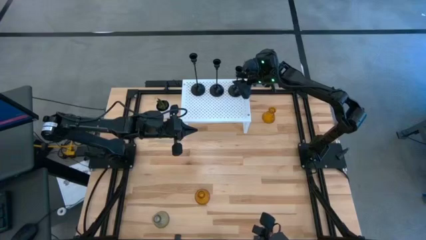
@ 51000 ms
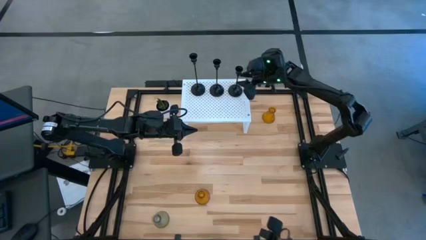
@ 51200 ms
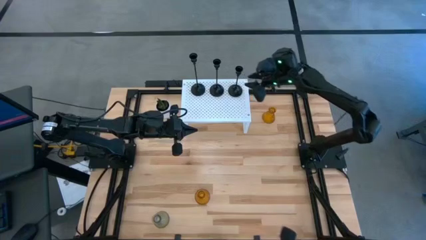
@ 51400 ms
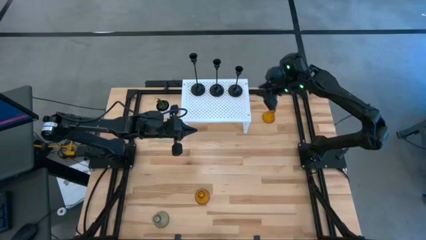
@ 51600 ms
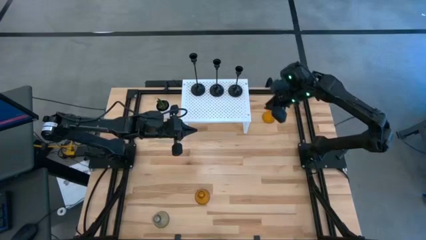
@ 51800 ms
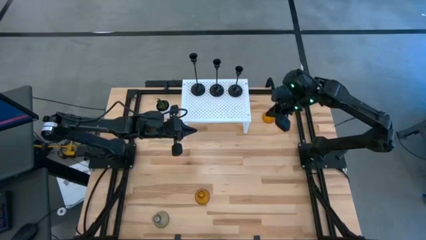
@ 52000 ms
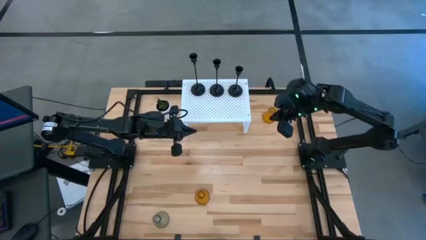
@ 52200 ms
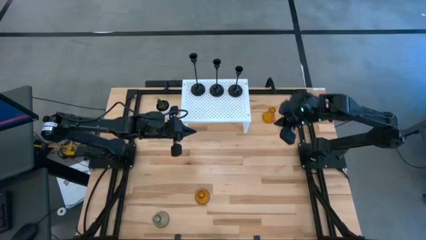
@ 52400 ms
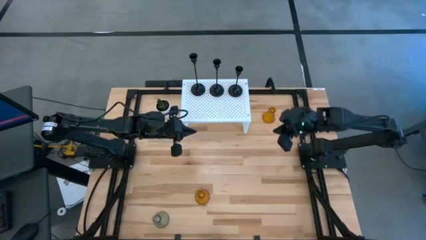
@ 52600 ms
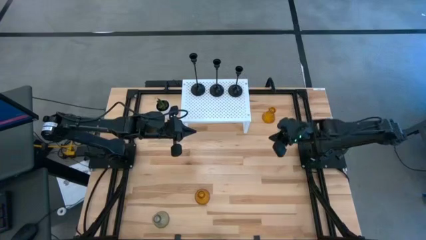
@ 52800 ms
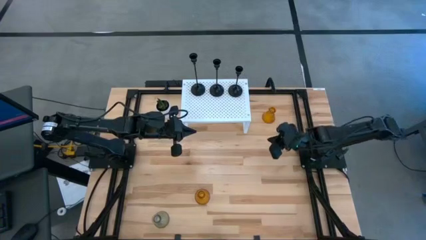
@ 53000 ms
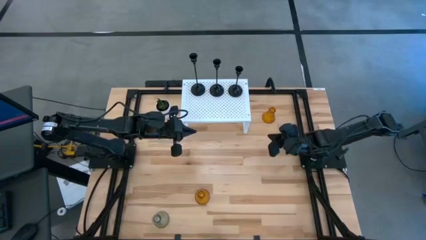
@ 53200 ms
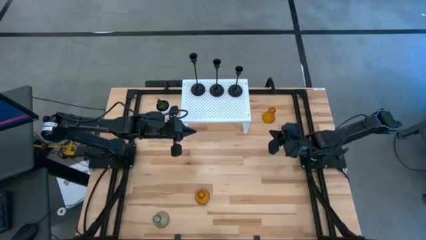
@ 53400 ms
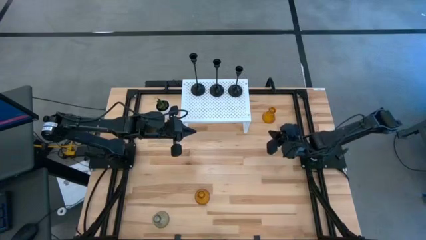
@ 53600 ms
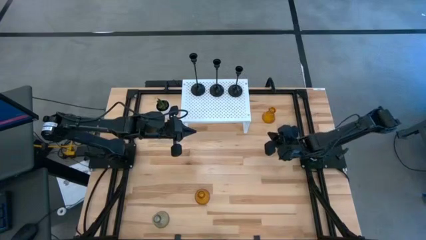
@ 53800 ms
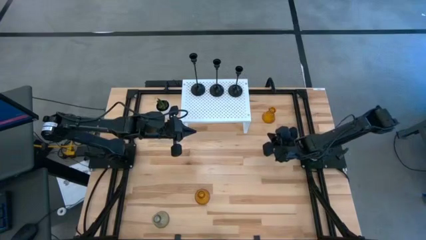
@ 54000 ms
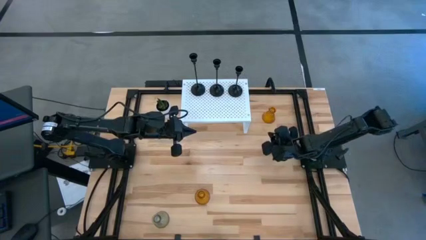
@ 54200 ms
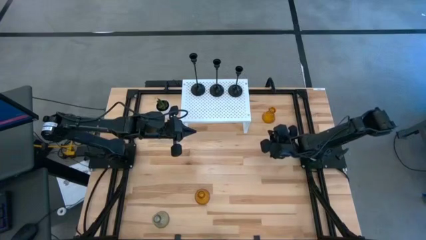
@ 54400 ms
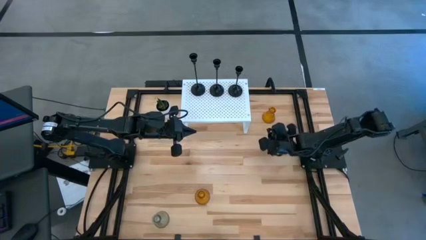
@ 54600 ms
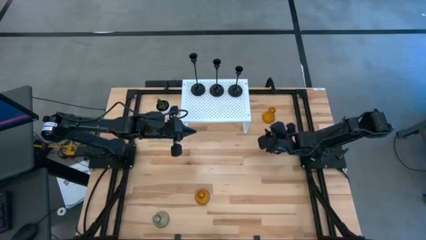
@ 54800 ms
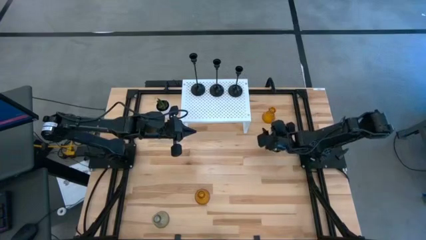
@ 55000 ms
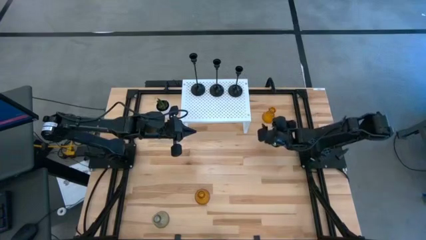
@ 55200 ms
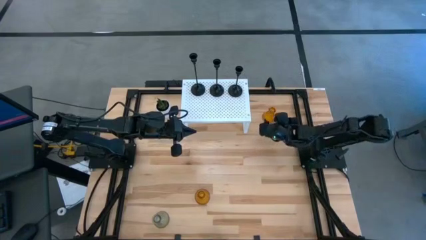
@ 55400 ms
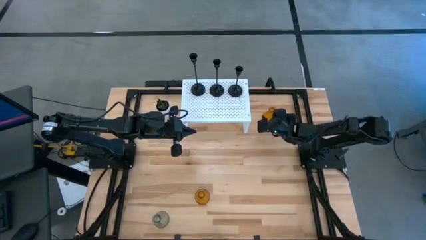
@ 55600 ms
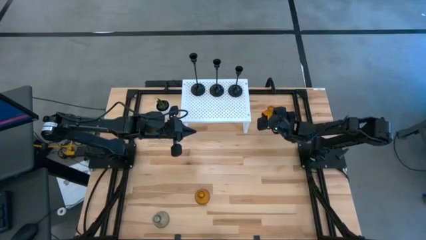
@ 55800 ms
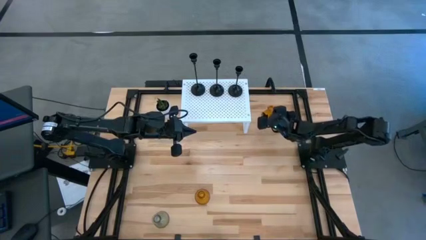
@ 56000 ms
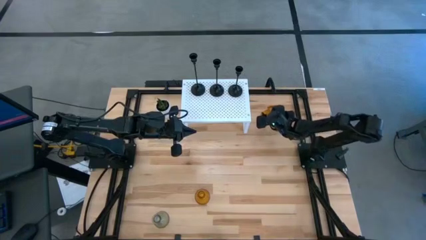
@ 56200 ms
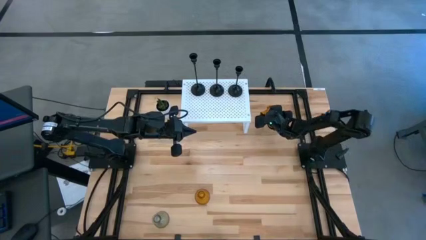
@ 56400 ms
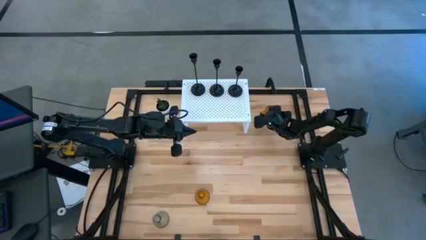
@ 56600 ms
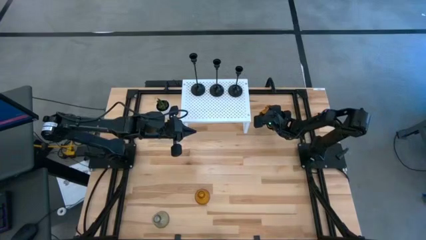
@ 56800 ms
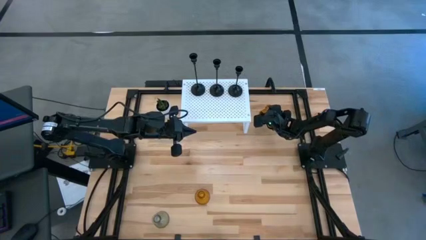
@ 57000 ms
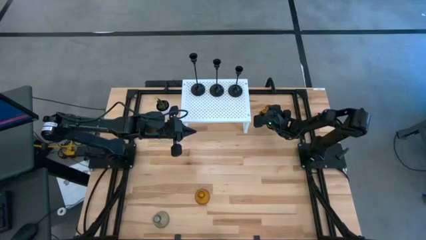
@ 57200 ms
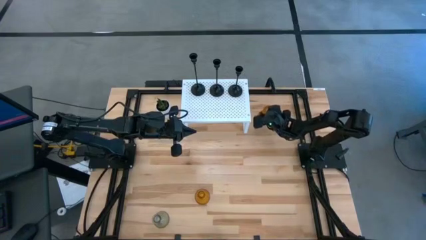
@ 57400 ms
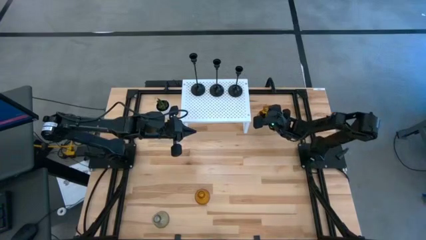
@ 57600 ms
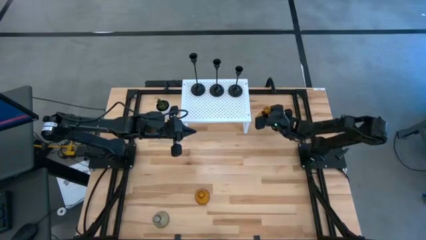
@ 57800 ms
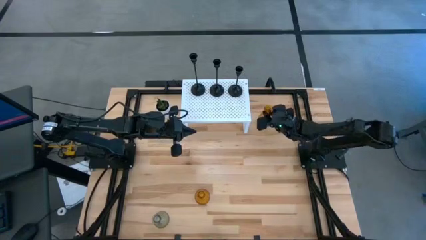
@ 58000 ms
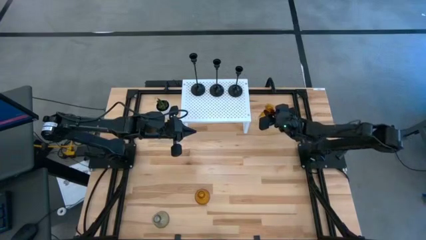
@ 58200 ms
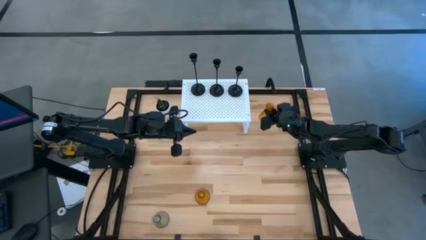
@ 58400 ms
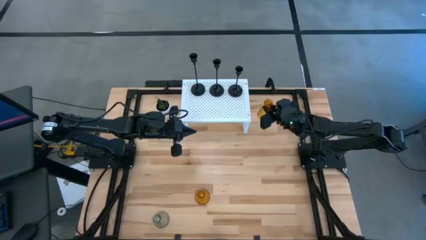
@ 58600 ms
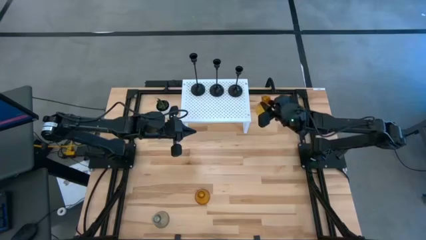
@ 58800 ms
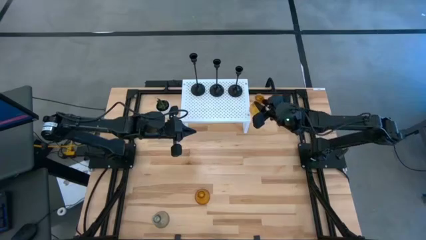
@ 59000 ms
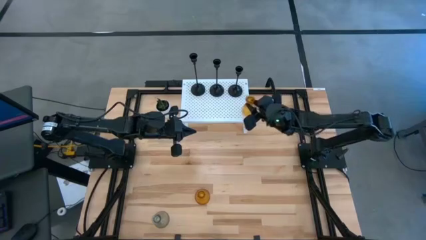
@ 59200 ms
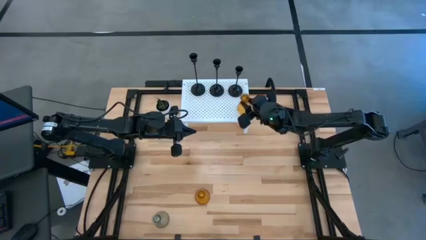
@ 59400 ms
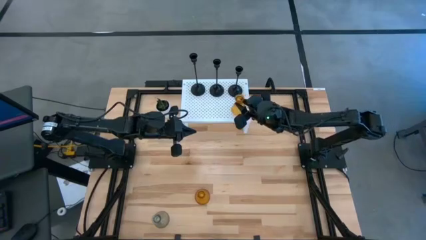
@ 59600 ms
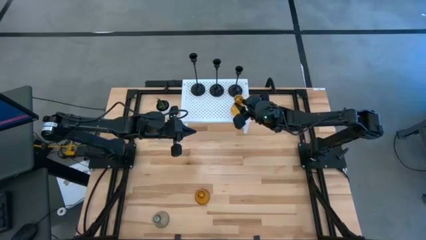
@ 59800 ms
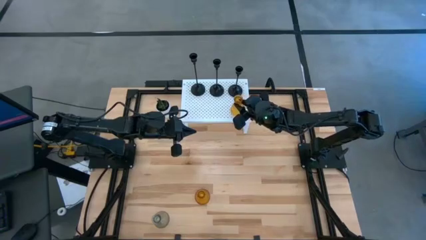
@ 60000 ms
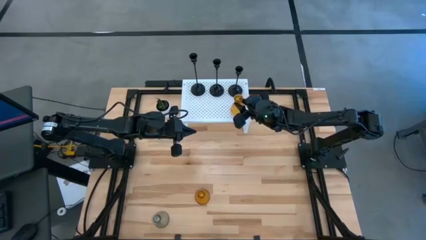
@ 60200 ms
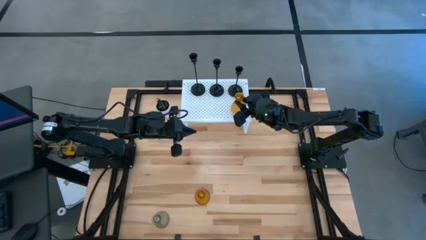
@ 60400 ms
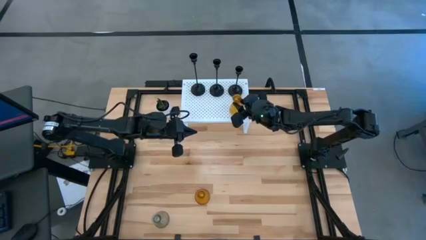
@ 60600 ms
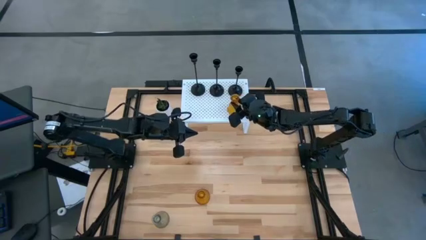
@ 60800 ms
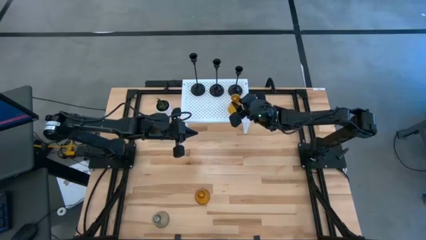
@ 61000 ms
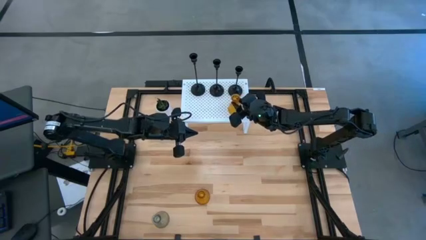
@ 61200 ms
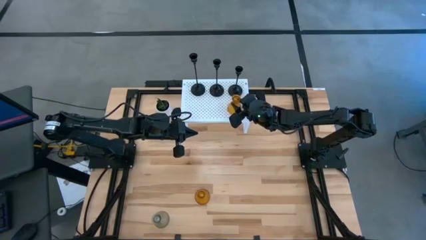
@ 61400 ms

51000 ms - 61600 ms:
Task: Pick & Place candle stick holders
Put the top yellow glass candle holder on the shelf
